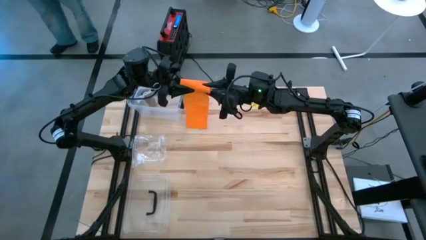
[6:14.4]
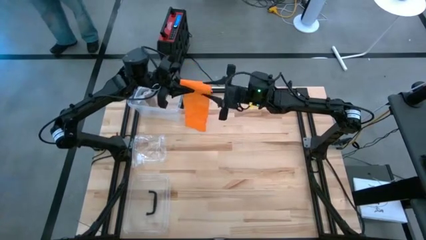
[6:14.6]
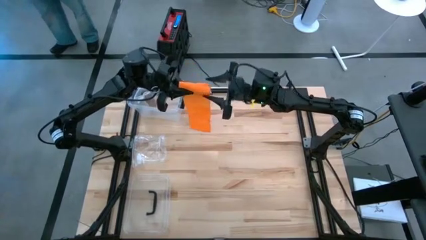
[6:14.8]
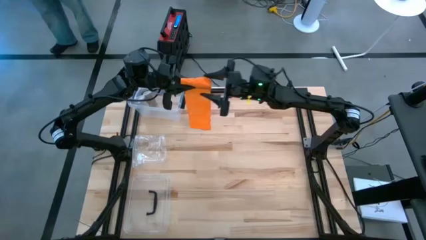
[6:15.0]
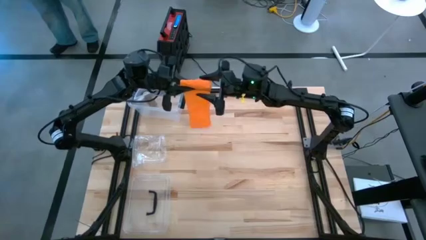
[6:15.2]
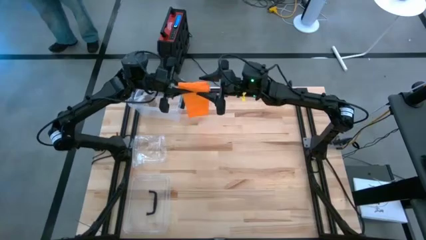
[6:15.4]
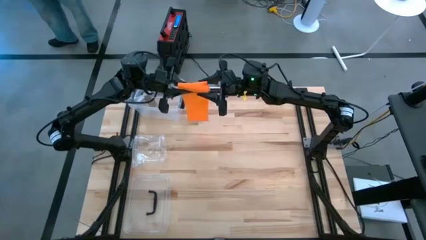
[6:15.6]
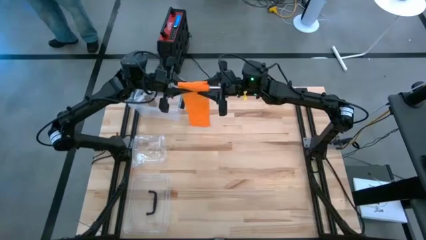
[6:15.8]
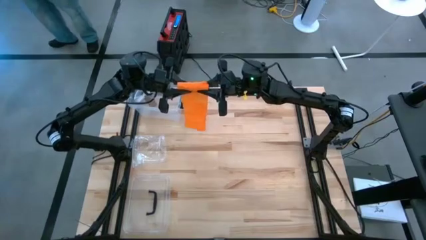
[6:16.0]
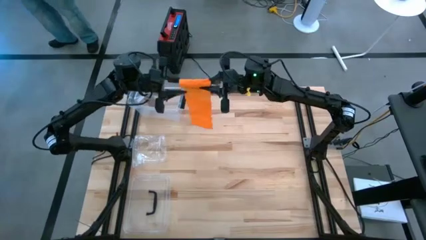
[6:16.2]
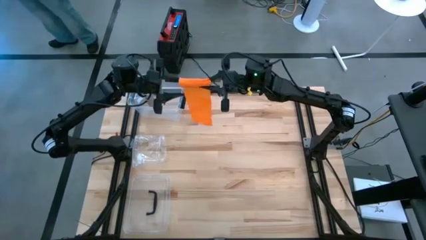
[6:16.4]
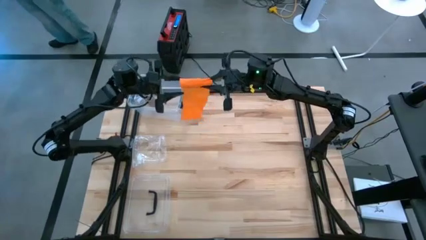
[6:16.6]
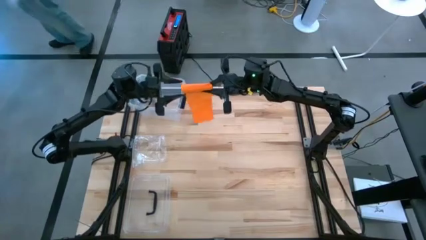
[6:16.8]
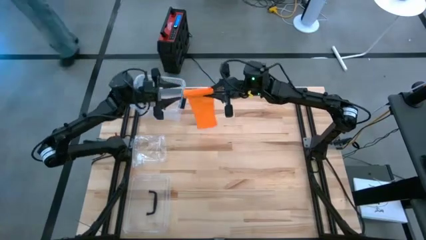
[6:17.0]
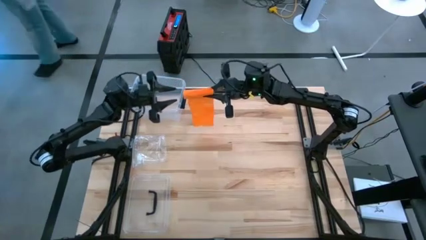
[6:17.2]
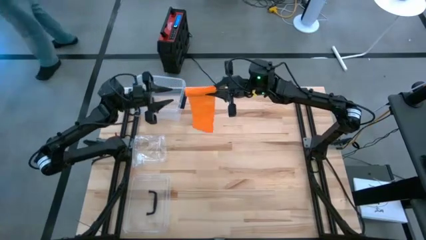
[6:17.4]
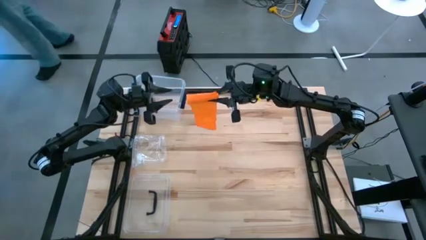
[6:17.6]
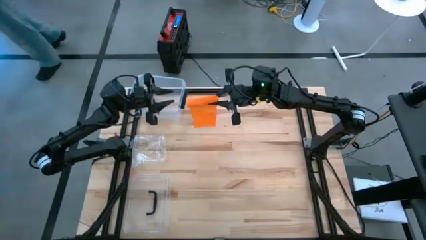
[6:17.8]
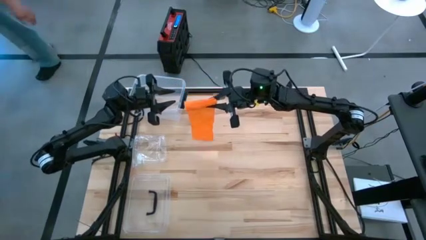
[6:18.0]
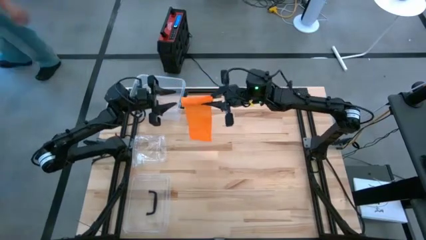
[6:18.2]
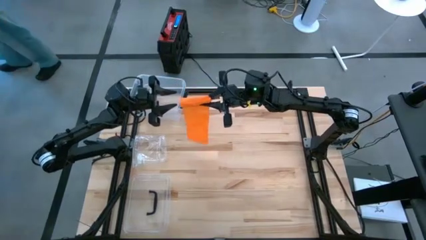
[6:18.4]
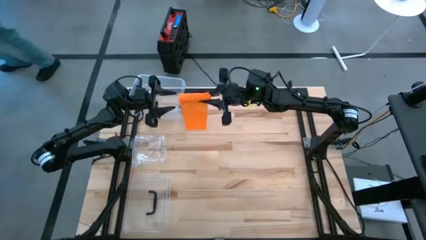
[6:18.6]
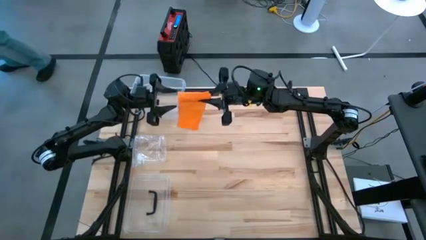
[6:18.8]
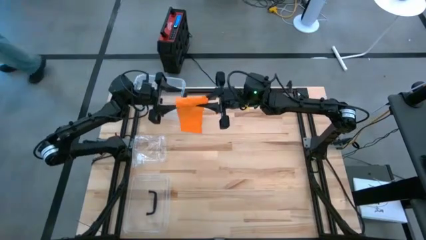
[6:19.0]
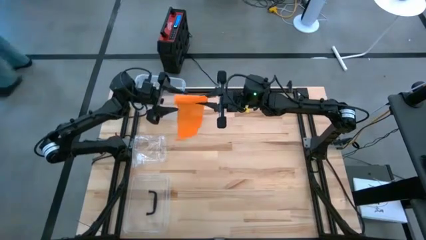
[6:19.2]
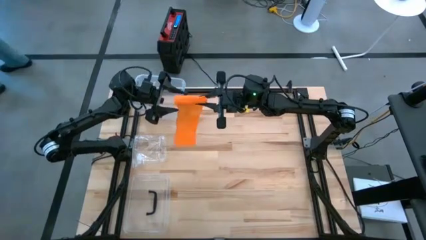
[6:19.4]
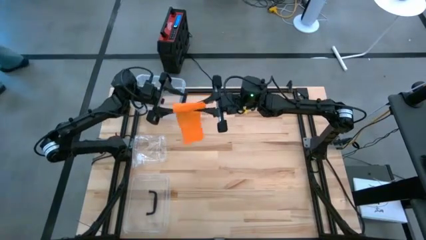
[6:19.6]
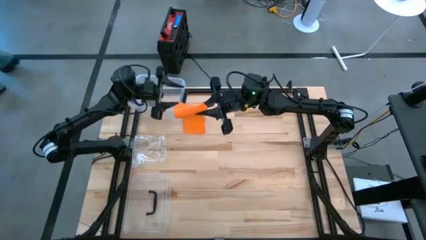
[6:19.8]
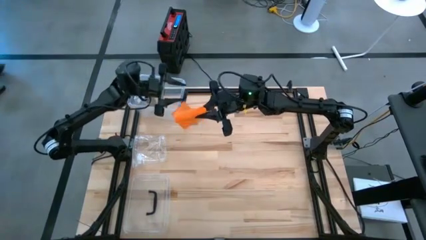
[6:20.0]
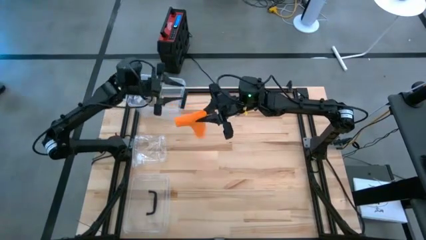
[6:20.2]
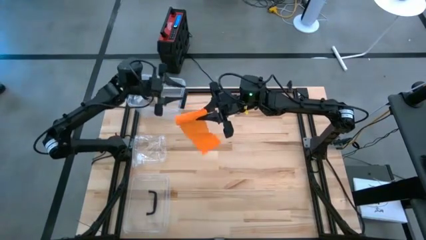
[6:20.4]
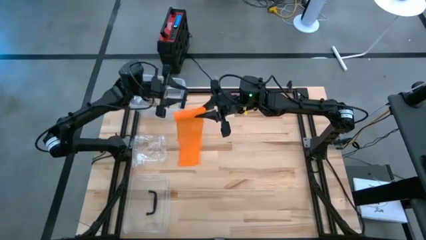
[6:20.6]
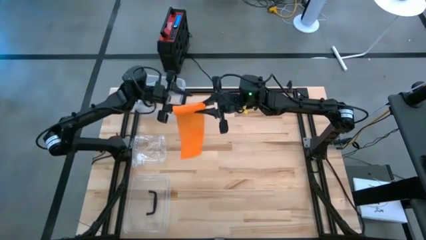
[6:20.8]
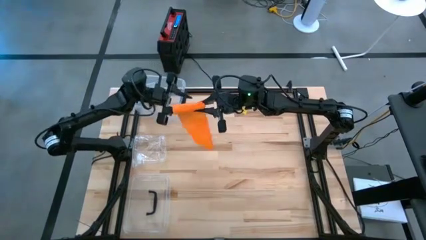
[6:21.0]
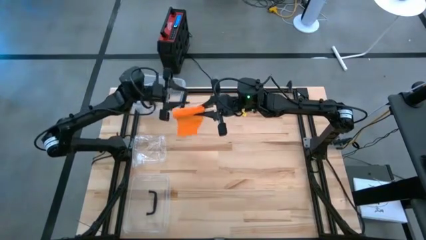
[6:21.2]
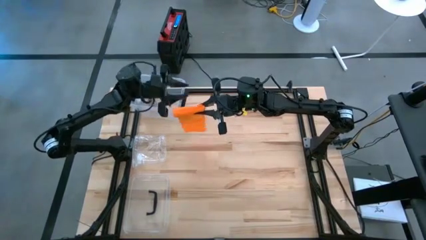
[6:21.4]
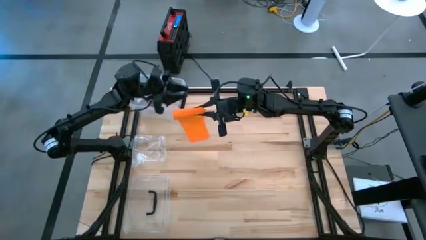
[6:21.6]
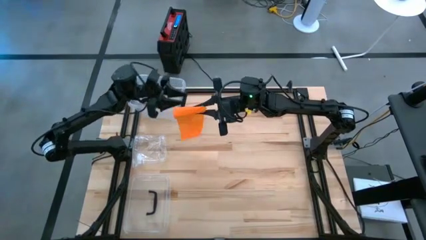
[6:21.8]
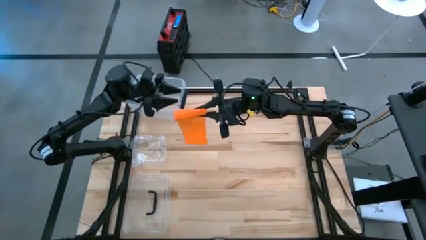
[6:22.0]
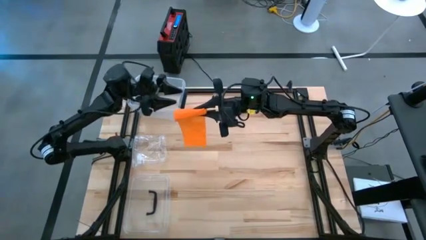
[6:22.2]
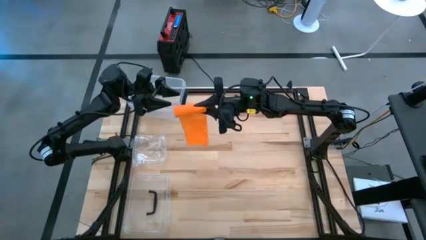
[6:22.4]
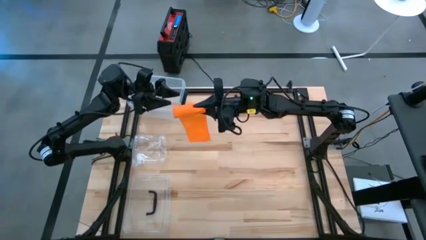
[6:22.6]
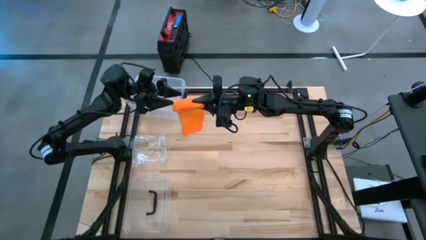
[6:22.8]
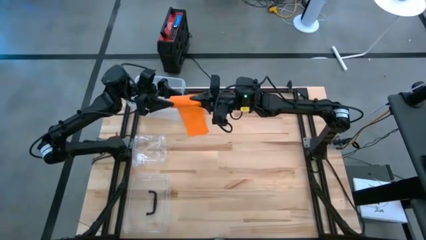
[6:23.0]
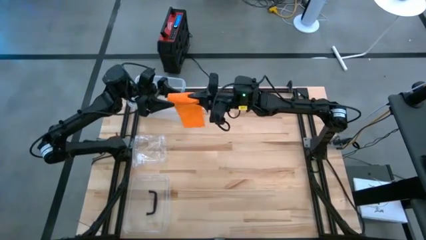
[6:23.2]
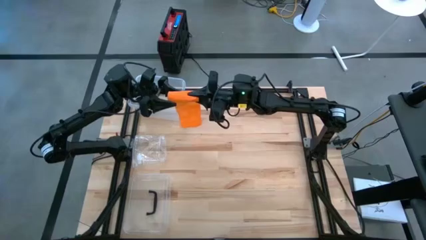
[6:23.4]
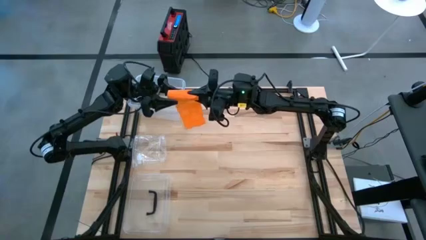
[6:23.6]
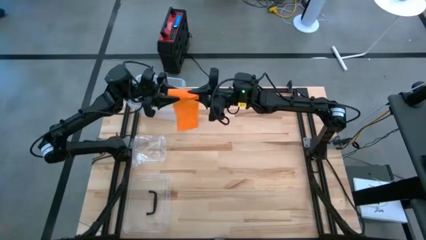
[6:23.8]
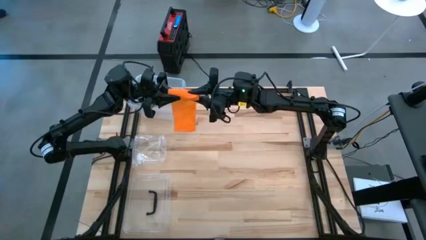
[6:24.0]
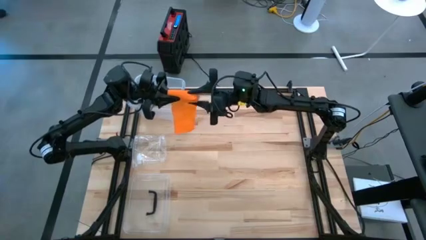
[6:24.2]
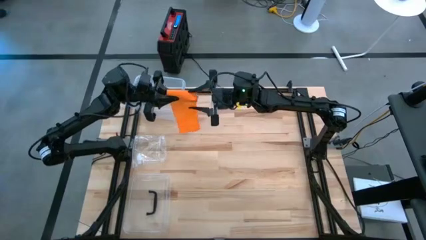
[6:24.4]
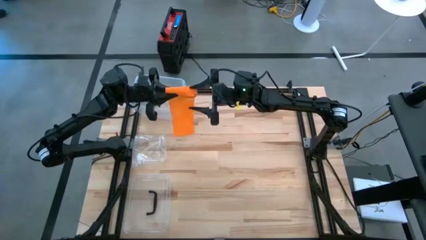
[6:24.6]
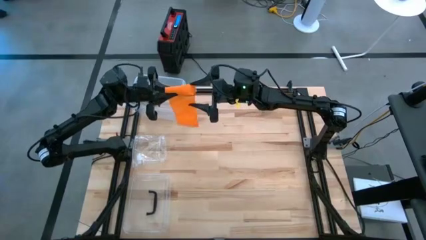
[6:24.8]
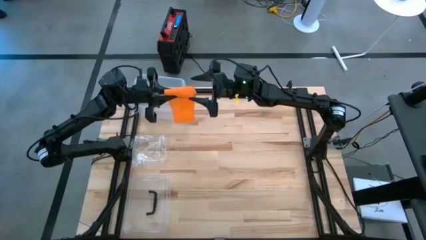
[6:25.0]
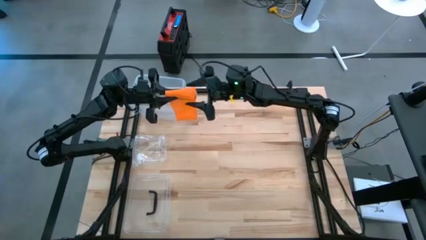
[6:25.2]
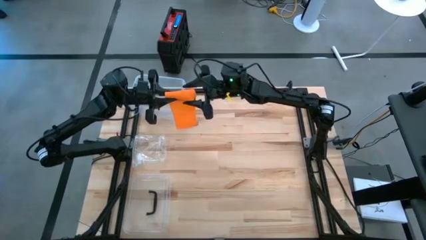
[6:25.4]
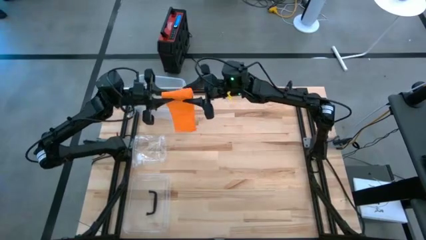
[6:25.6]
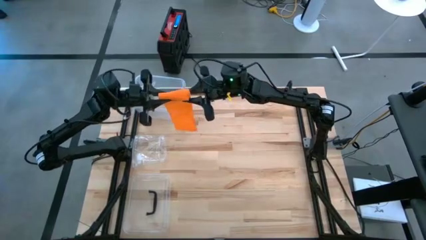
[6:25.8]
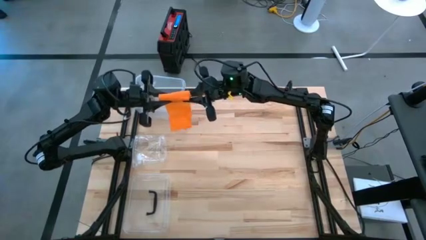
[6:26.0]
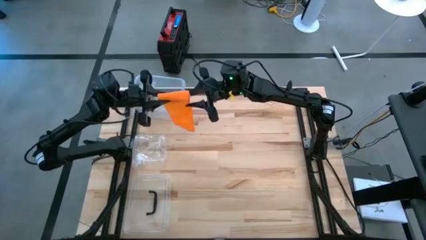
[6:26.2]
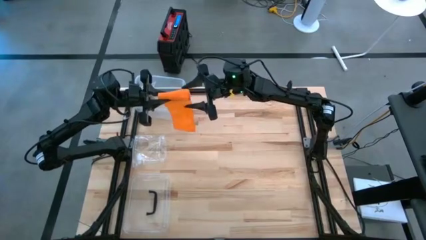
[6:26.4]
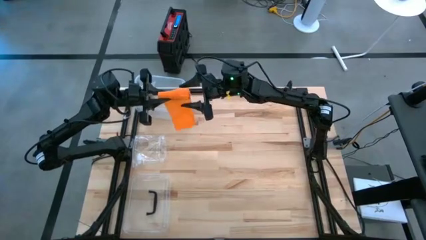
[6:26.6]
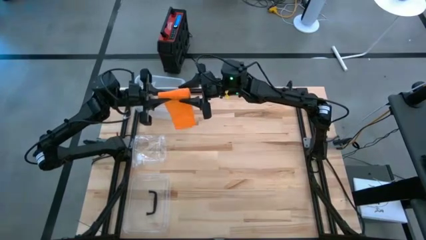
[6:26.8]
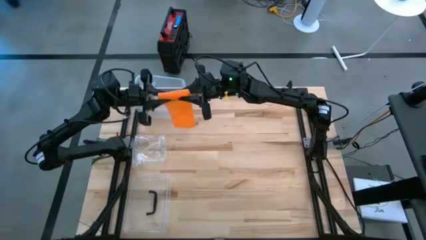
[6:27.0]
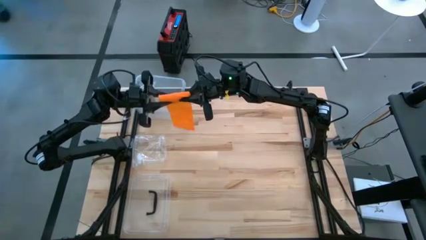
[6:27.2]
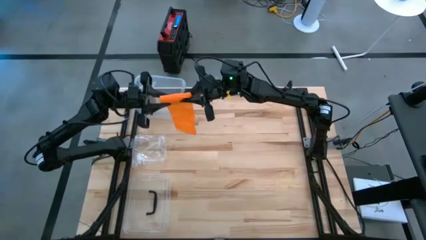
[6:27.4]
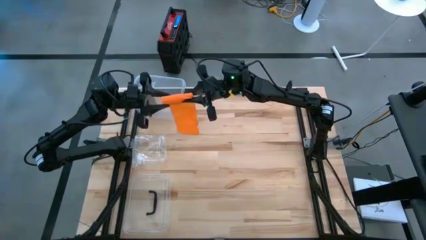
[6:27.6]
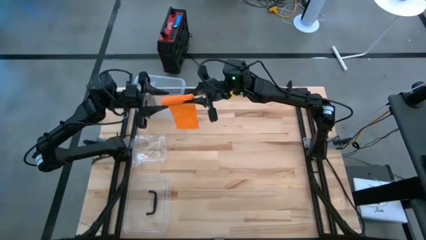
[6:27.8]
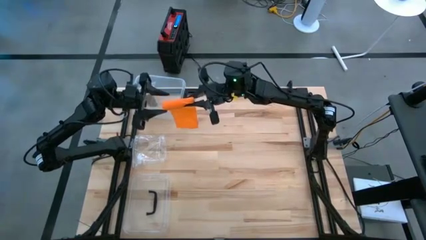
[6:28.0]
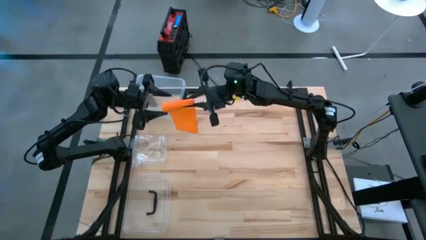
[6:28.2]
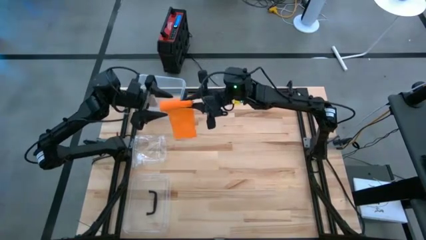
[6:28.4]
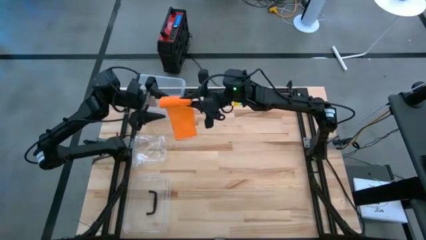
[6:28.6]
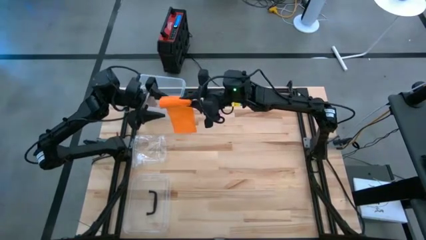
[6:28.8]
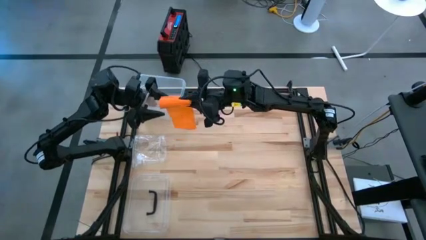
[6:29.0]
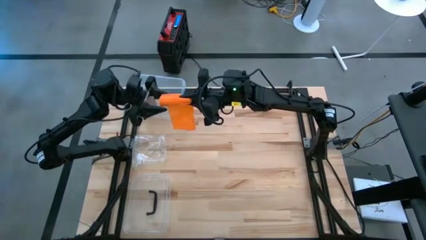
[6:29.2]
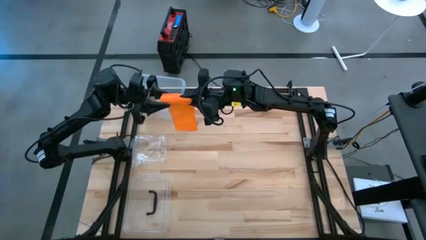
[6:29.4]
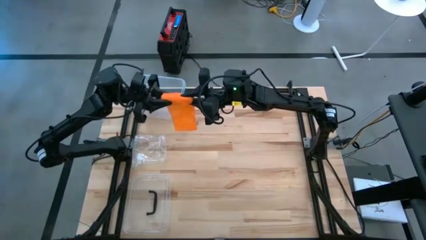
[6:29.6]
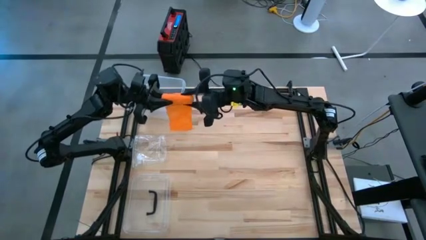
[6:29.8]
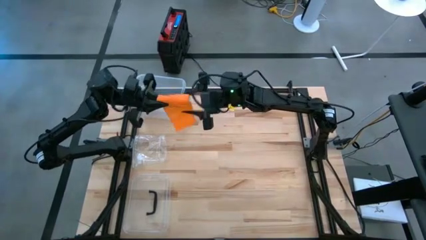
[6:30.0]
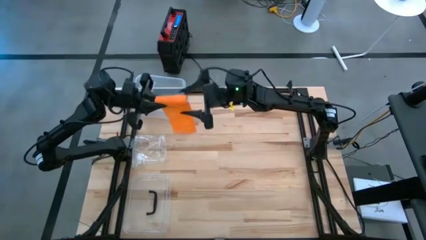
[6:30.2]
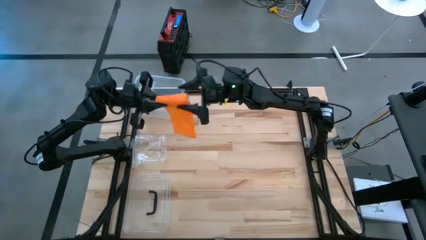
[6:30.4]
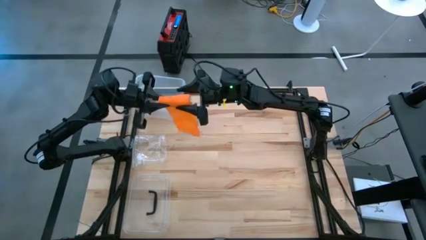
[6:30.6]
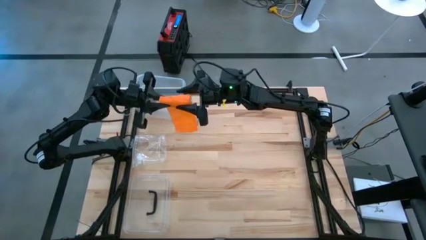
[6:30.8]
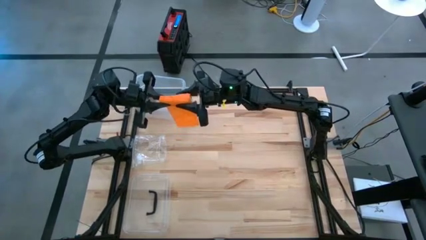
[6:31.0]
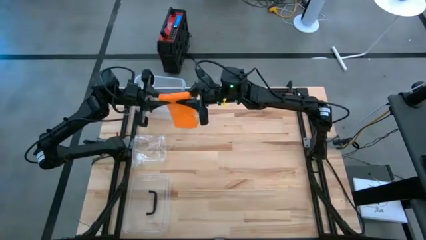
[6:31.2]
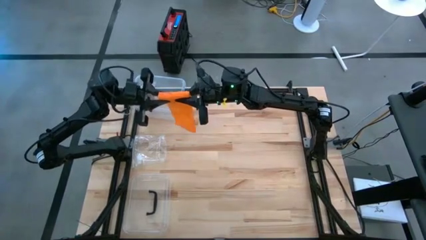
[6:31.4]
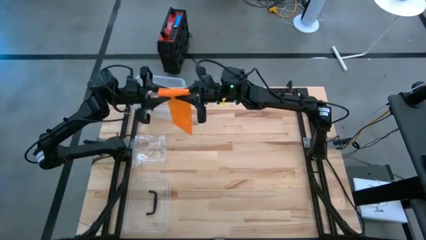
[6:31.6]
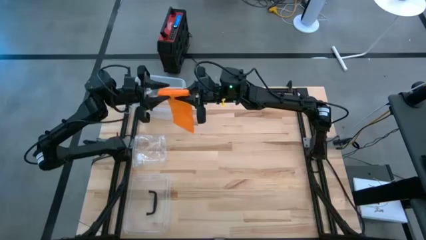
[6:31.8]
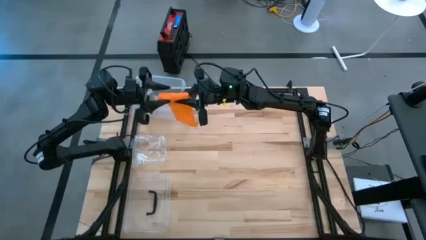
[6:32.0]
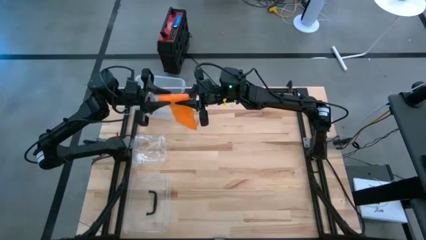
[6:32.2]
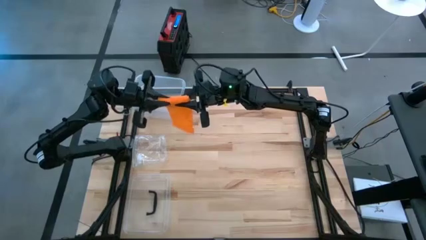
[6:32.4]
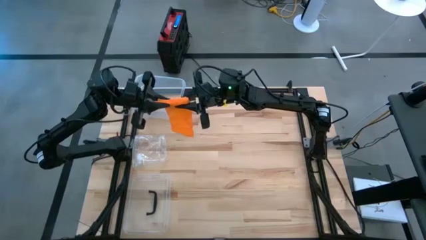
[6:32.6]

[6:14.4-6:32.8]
Task: Roll bandage
Roll the orange bandage
